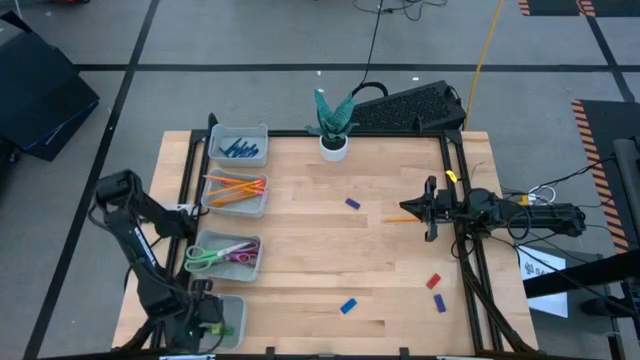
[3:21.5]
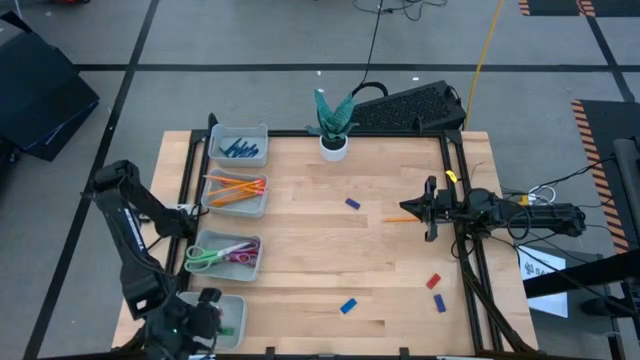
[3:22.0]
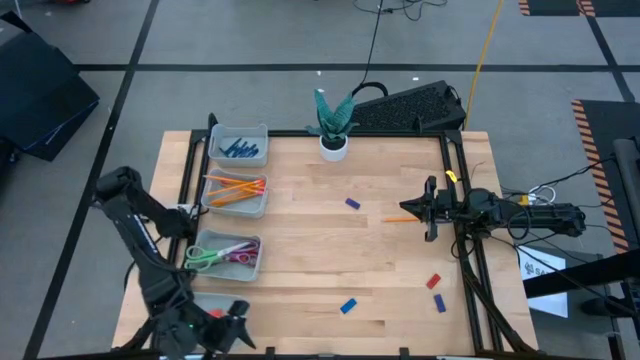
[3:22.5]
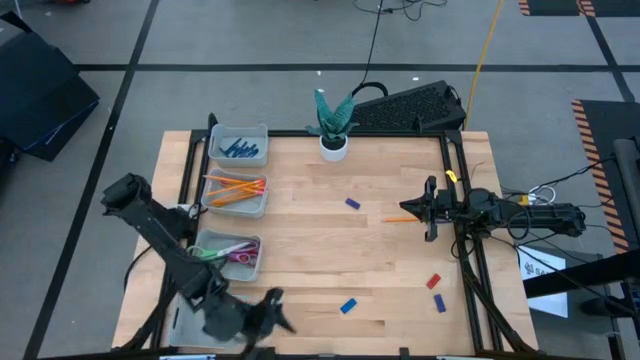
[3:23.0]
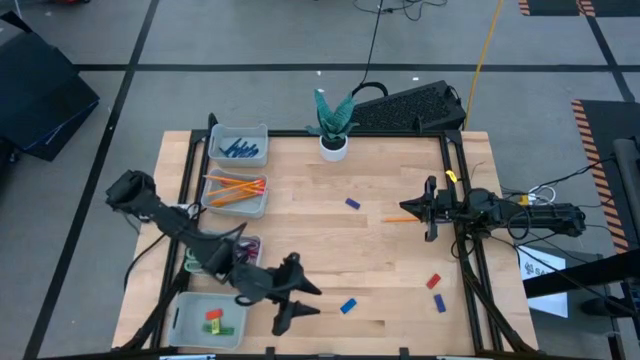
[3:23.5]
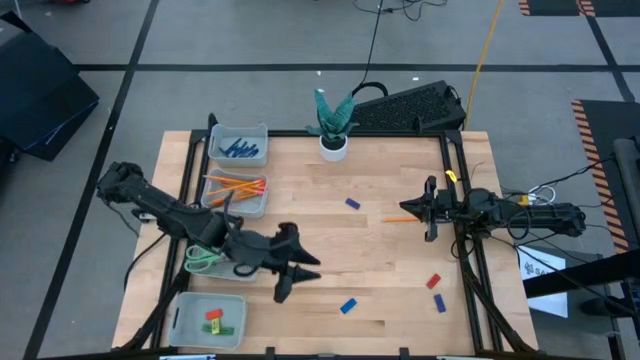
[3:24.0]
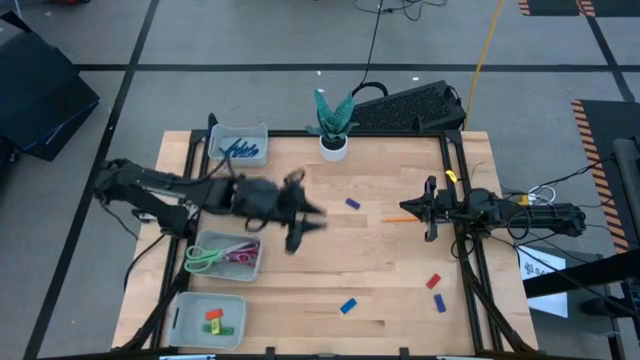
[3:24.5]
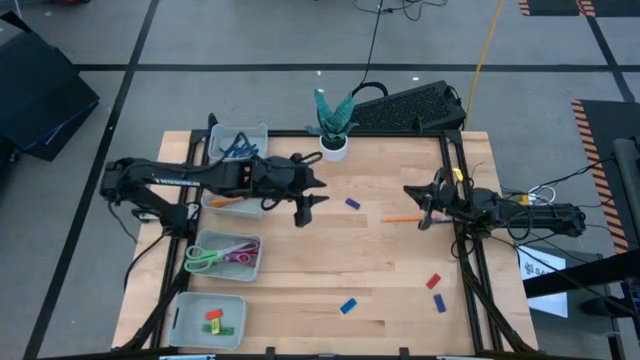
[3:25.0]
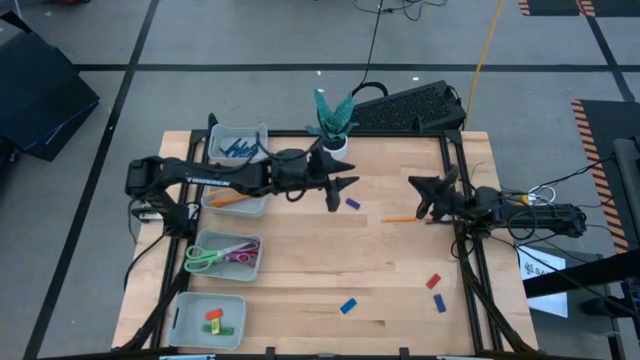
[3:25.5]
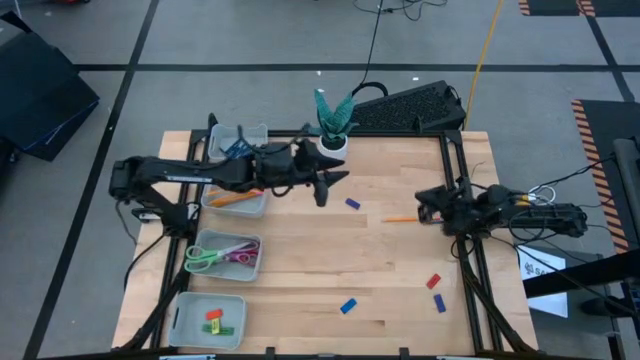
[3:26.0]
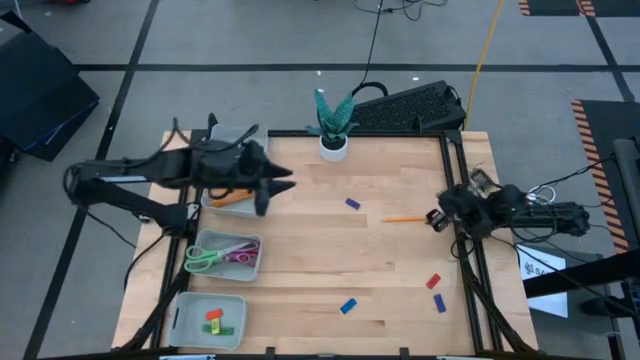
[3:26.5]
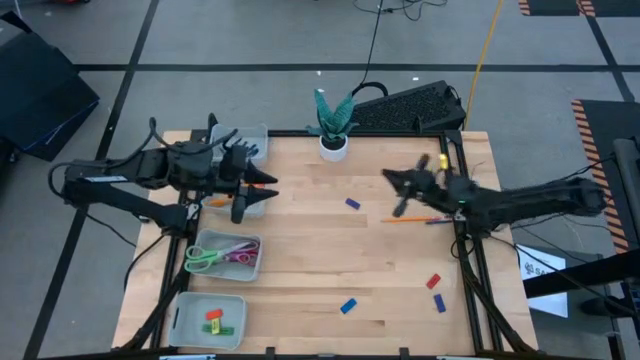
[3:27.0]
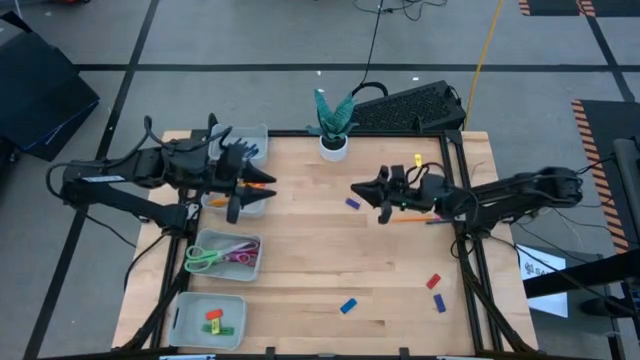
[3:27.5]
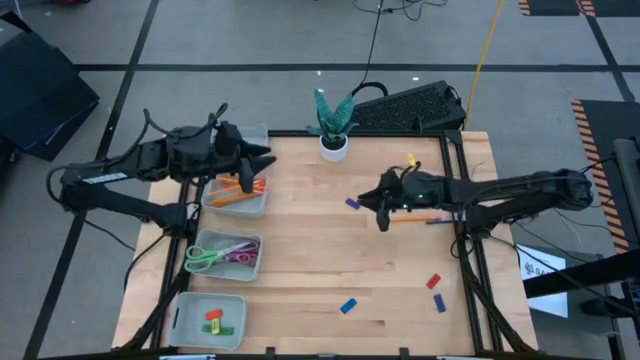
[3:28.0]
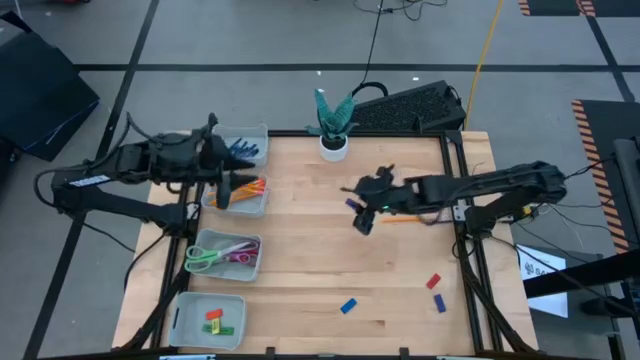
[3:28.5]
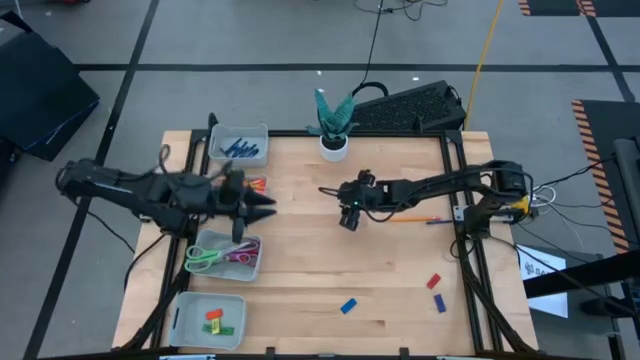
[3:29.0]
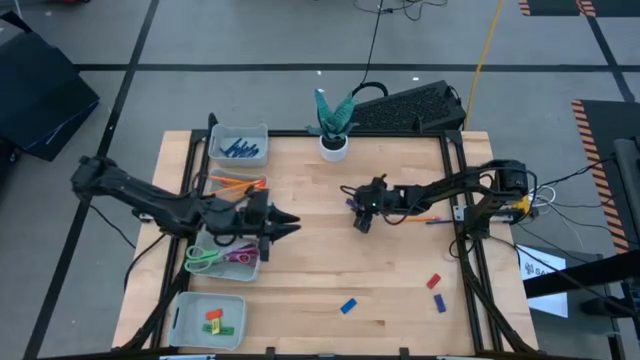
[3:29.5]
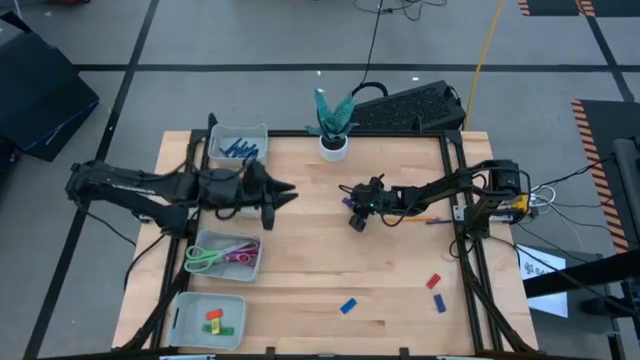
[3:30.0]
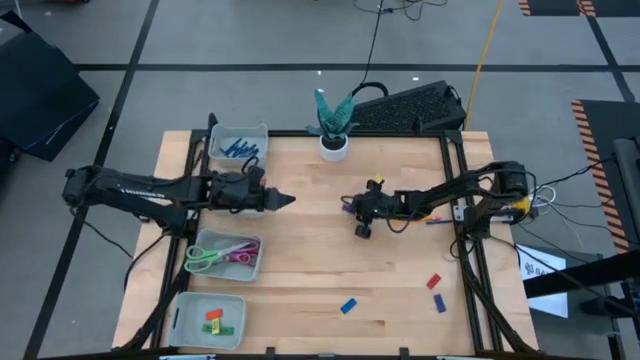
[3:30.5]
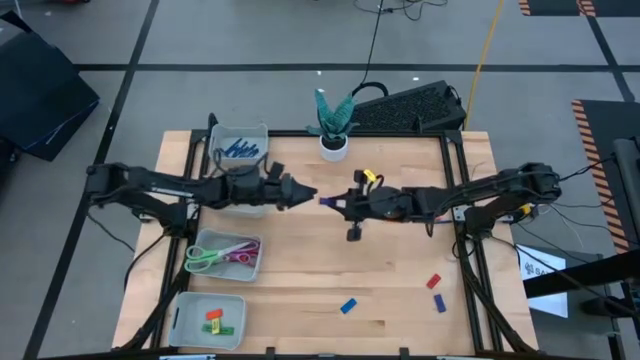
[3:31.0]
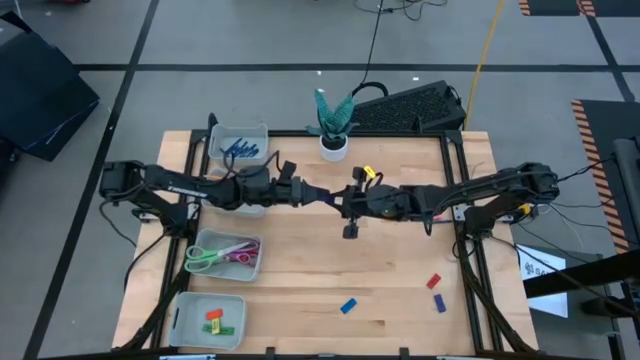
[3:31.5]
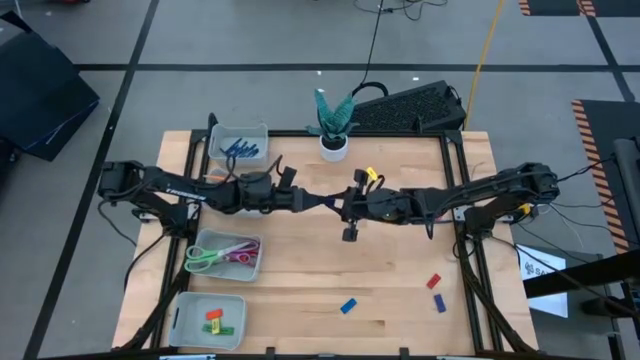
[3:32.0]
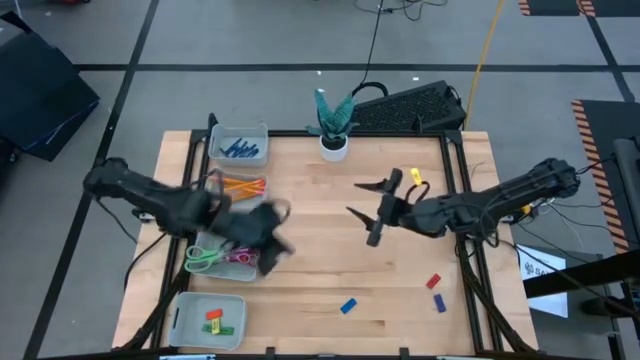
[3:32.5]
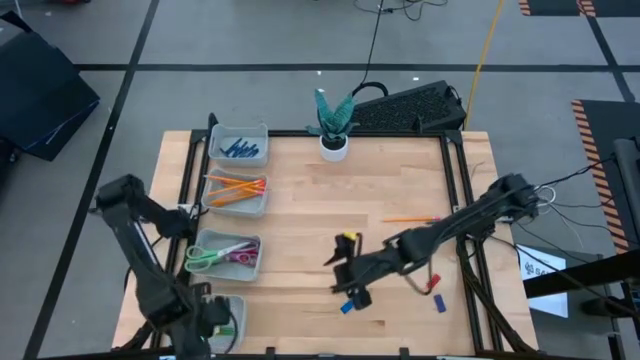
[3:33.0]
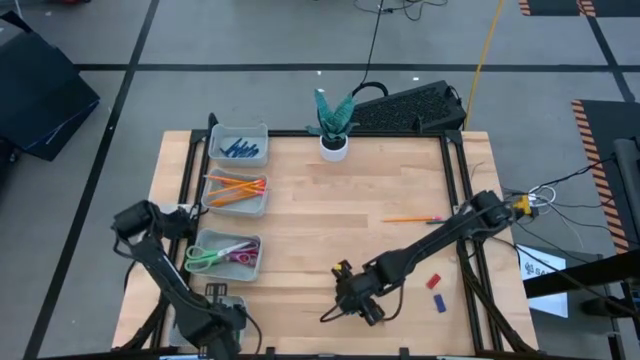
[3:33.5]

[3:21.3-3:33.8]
Task: Sort crayons/erasers/pens/pencils in bins
Put the purple eraser into the bottom

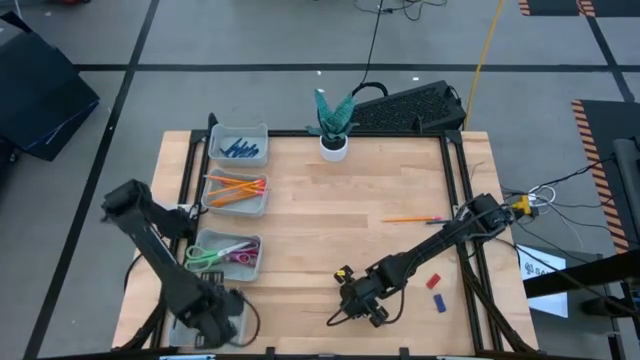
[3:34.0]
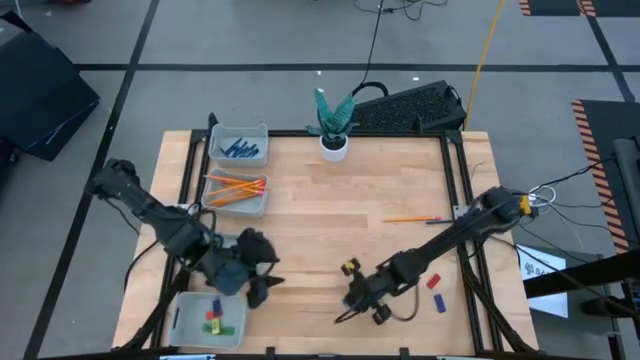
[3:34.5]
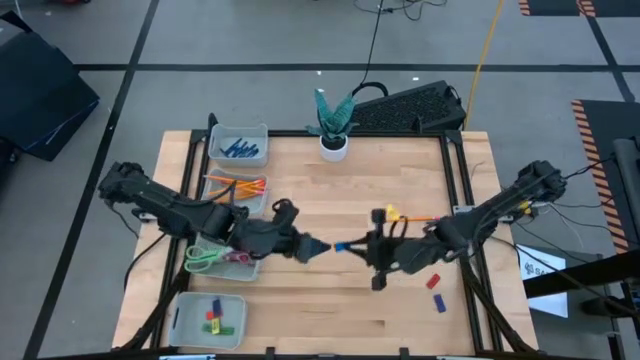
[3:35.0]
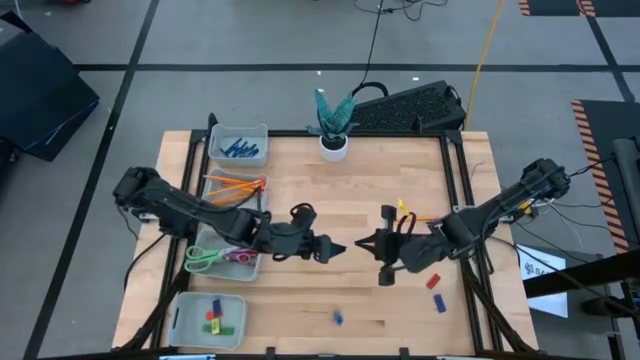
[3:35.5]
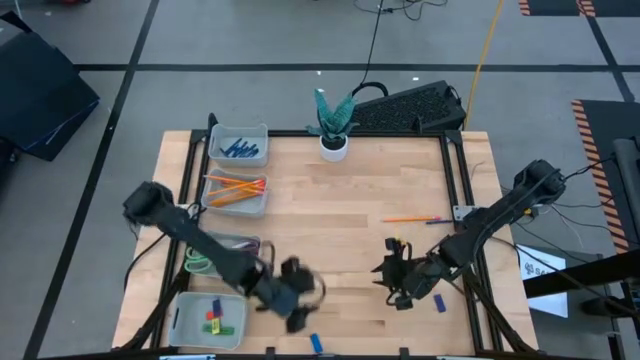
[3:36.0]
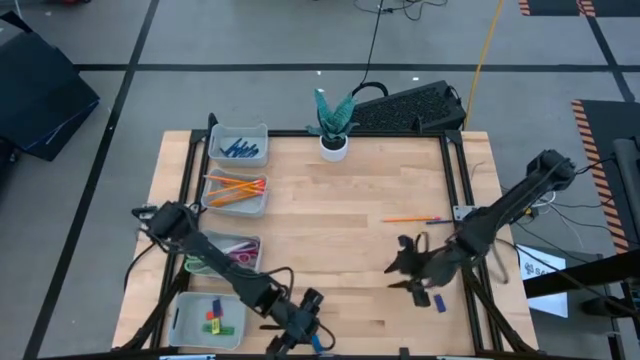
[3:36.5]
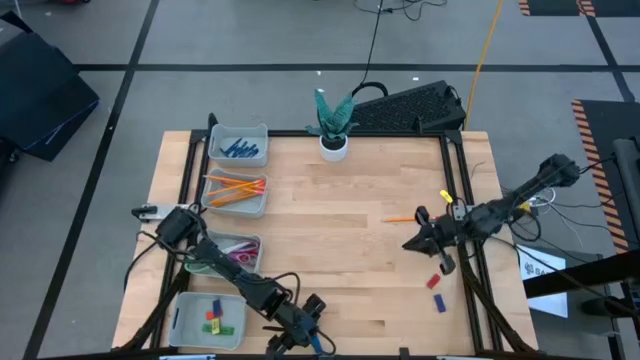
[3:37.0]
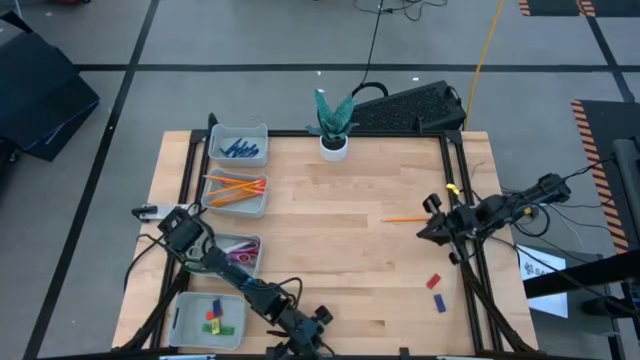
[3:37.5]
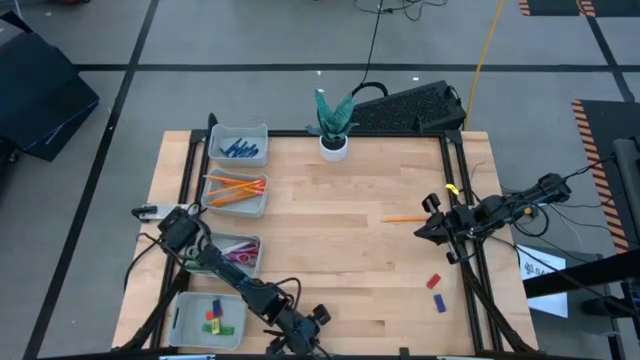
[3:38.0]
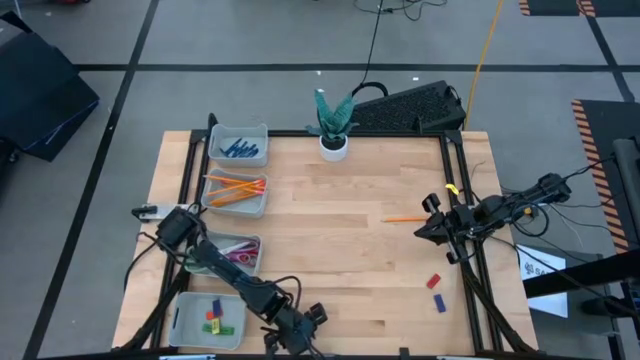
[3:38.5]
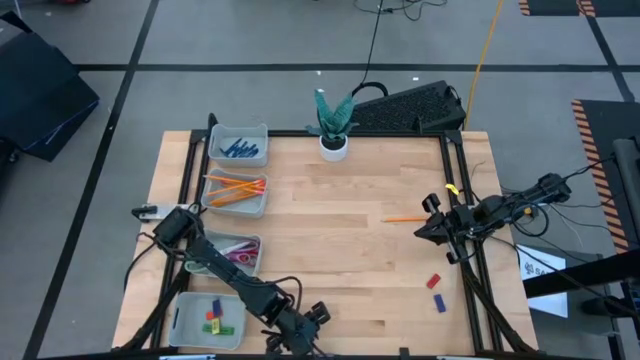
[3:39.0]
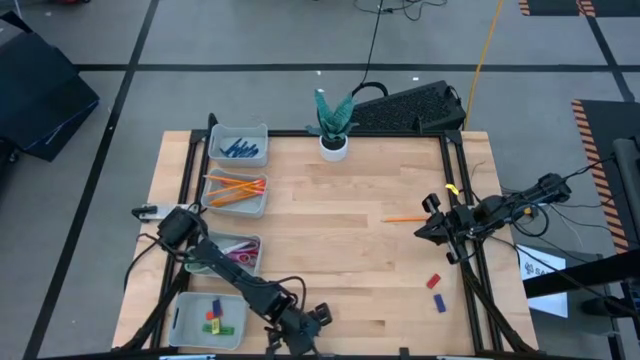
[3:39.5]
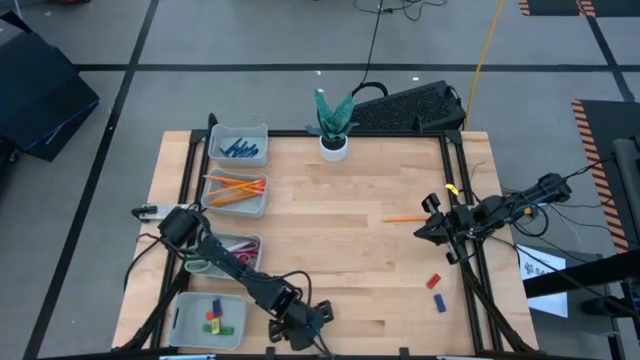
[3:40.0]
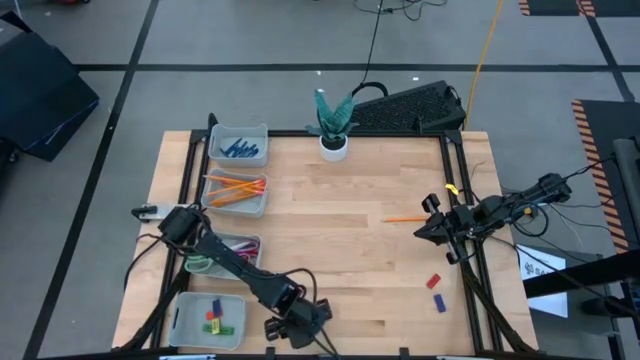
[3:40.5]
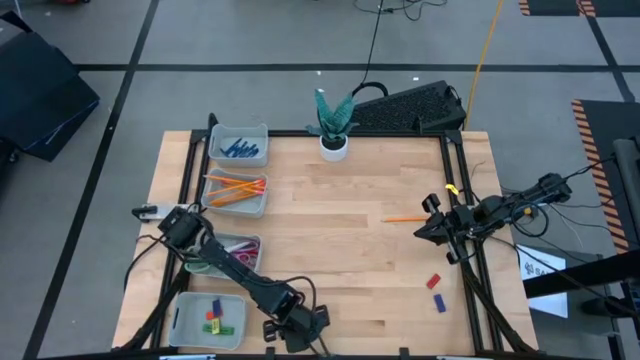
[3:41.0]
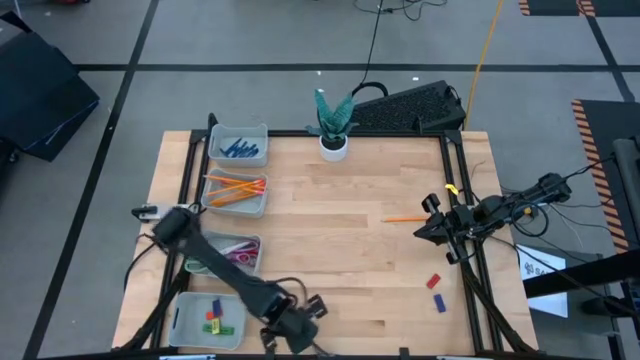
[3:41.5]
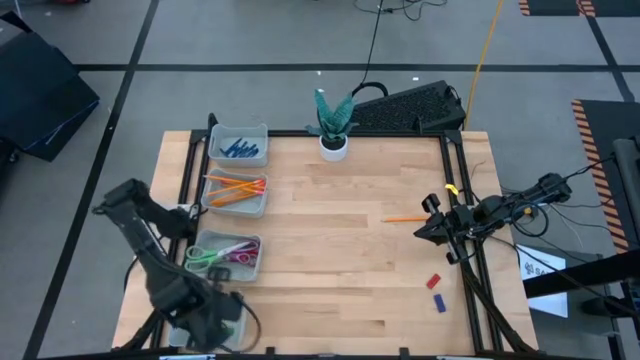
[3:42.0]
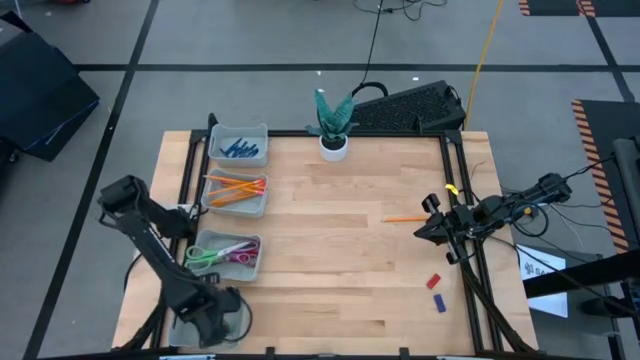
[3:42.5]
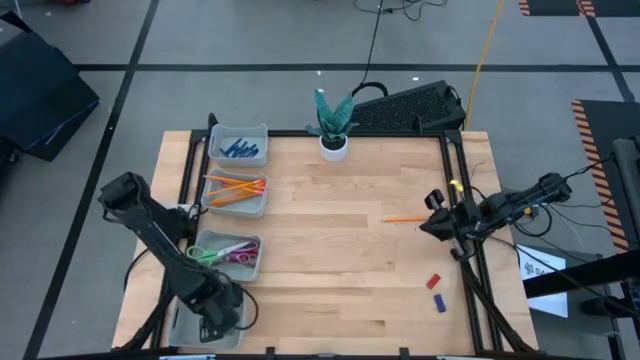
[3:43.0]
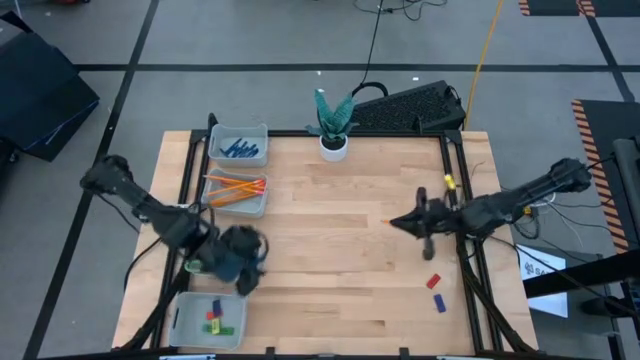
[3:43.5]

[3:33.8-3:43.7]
Put the blue eraser into the bottom
